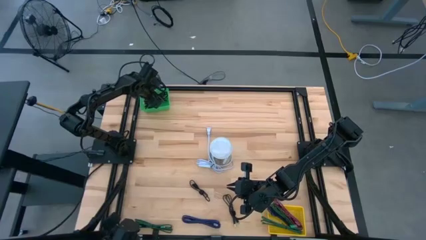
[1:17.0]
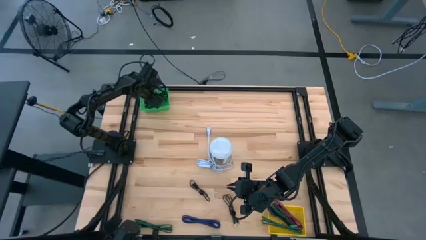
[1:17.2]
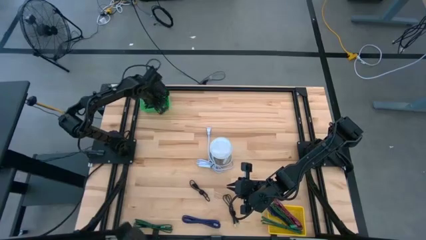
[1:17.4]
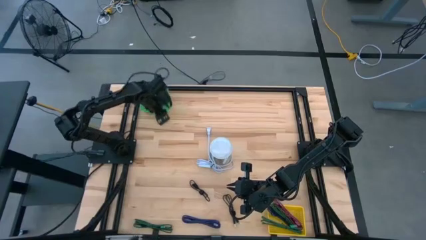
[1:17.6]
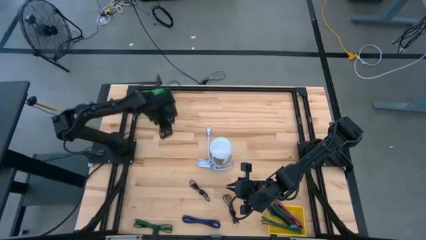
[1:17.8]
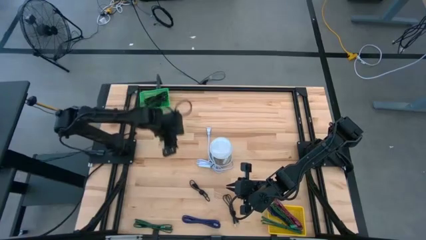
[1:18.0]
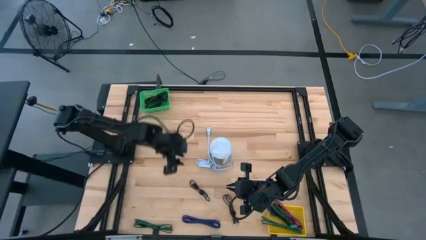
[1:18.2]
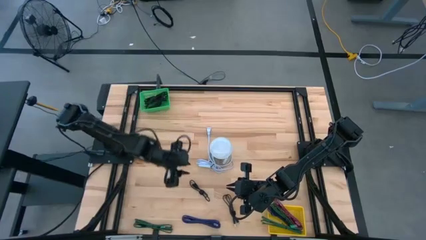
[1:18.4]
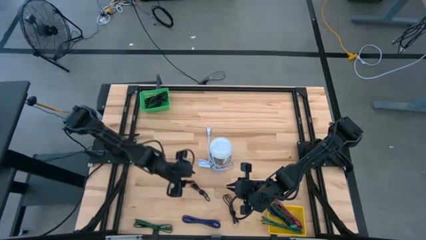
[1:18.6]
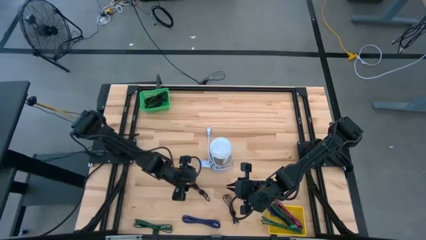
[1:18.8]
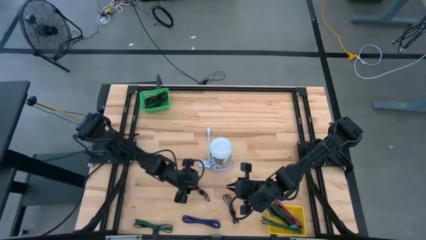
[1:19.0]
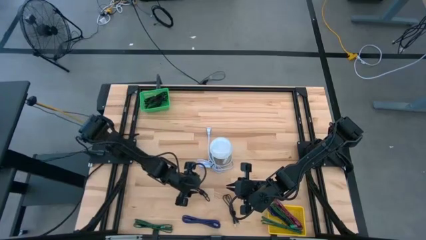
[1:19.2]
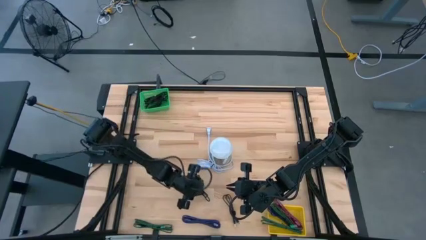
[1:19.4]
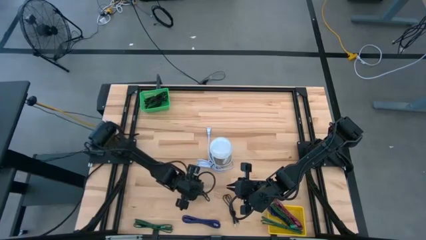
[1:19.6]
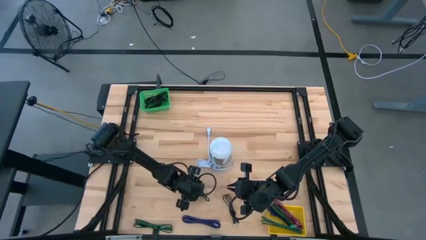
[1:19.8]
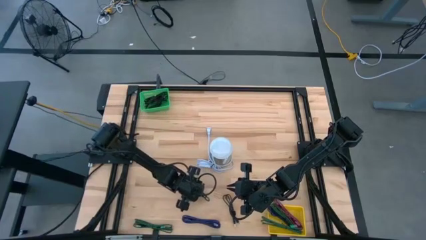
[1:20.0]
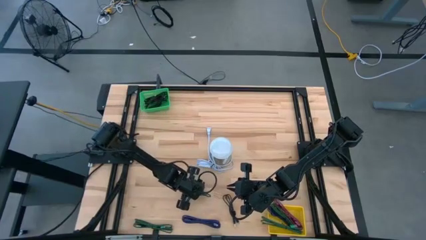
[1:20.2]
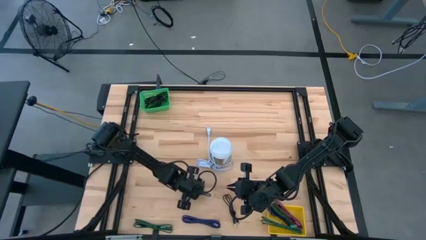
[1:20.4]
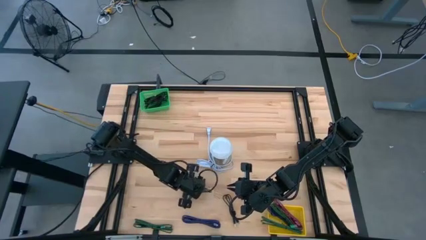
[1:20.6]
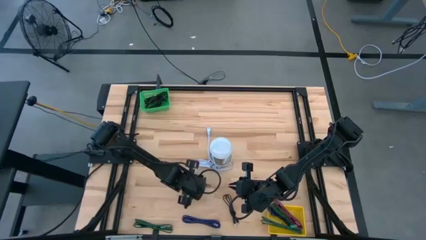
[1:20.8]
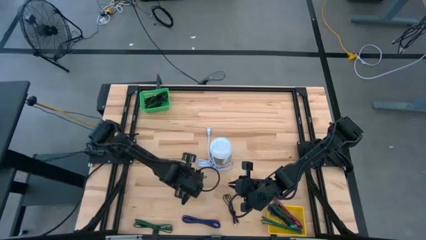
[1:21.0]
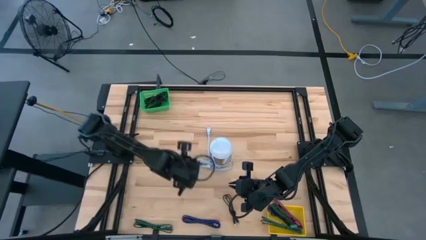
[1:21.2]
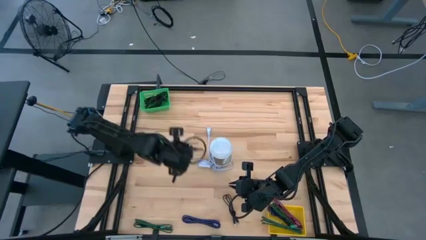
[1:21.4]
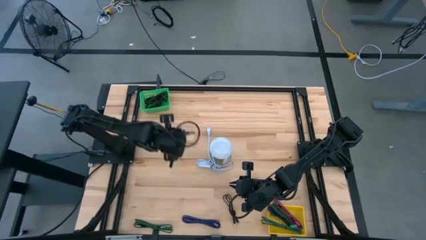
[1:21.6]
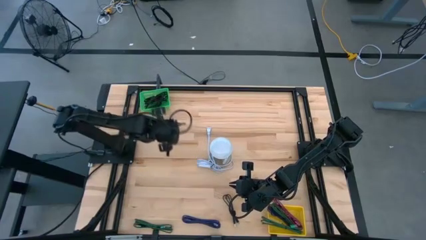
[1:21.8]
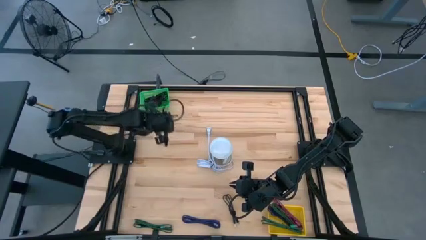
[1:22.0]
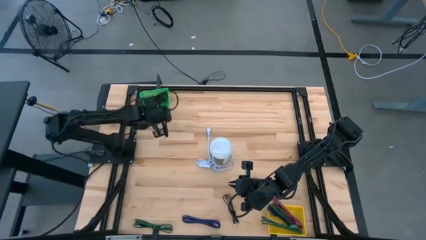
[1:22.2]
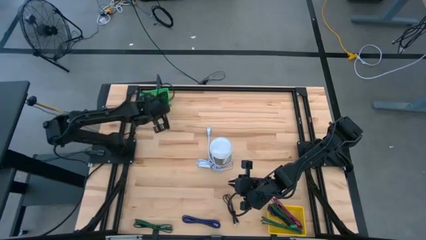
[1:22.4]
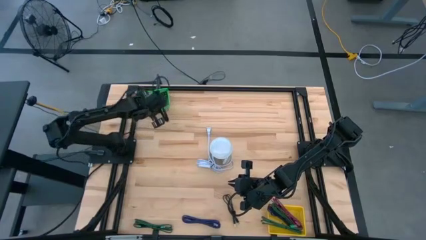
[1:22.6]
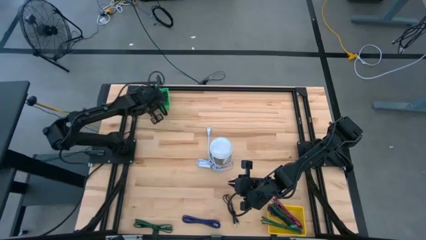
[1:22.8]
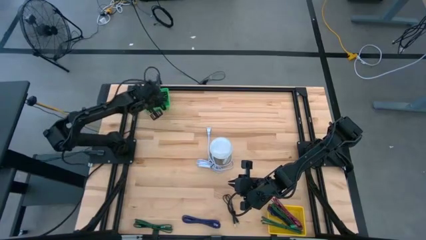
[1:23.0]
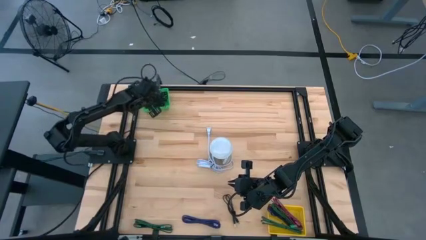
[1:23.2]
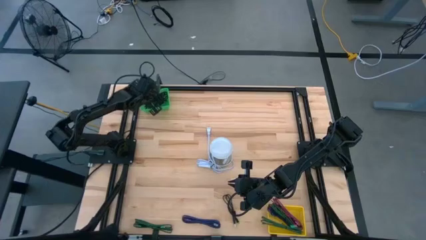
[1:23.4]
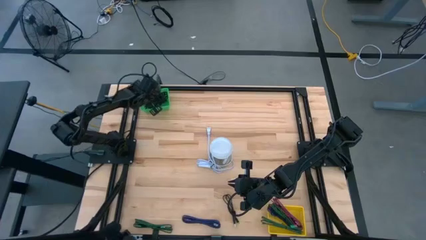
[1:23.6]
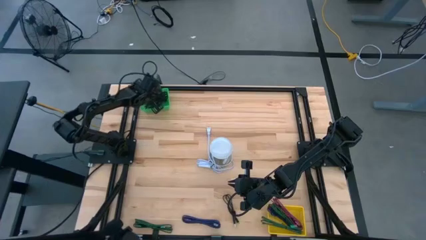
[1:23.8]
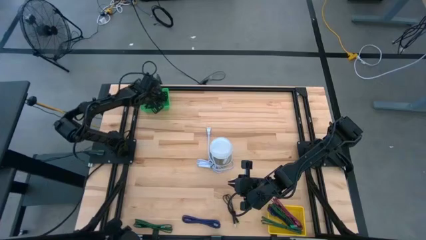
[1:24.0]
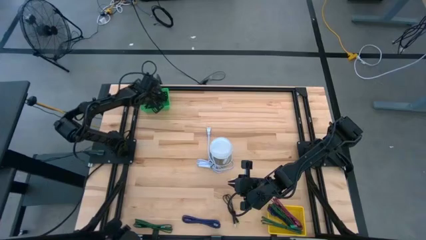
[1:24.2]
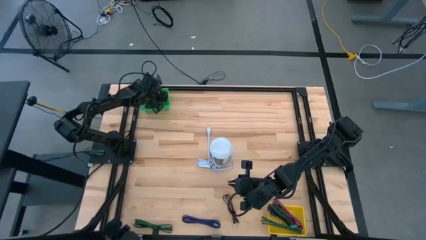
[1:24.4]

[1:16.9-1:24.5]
Task: Pick & Place USB Port
Put the plain black charger cable into the green basket

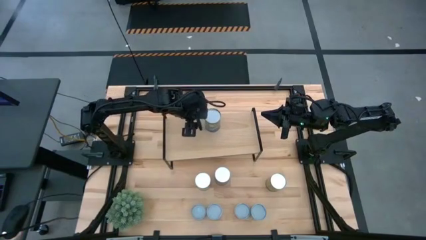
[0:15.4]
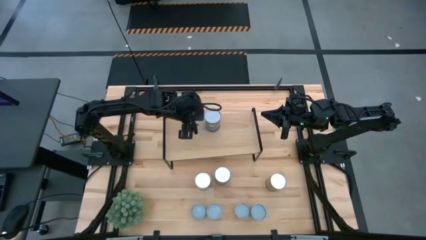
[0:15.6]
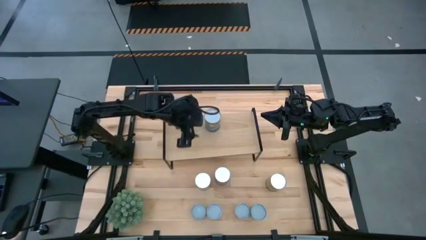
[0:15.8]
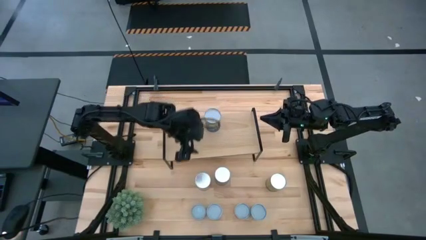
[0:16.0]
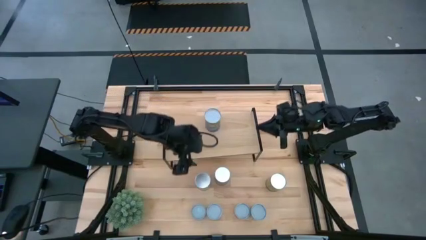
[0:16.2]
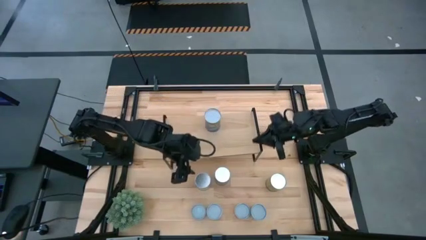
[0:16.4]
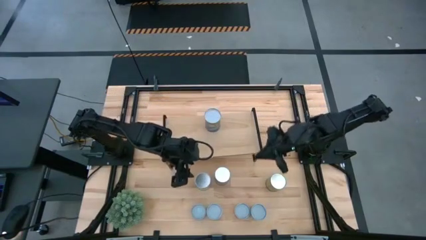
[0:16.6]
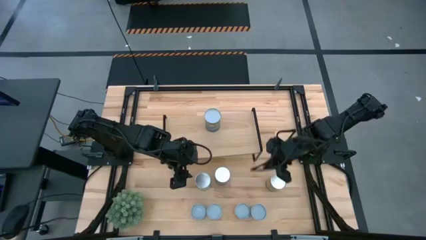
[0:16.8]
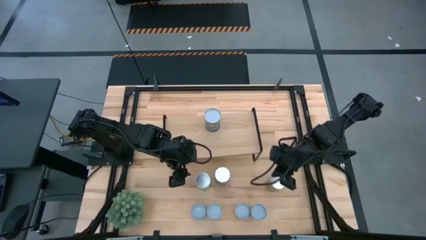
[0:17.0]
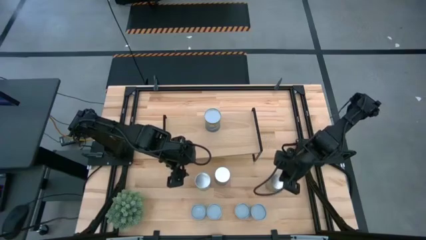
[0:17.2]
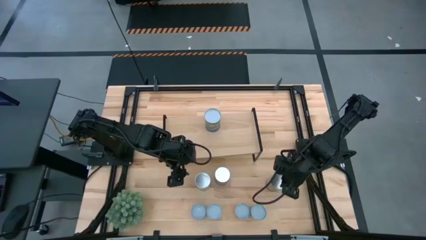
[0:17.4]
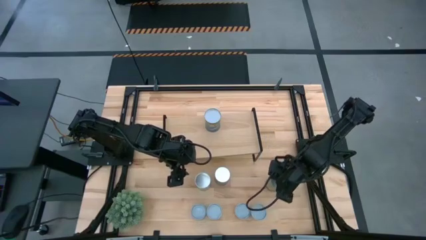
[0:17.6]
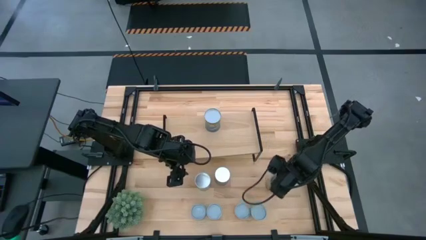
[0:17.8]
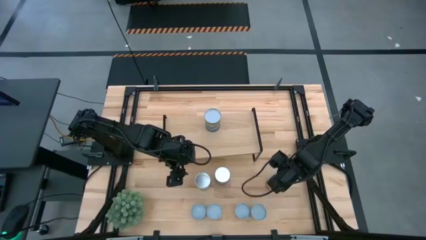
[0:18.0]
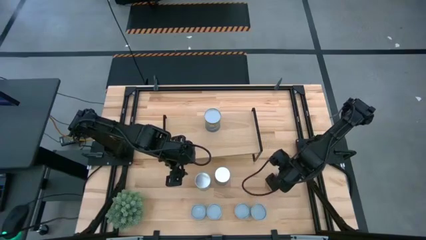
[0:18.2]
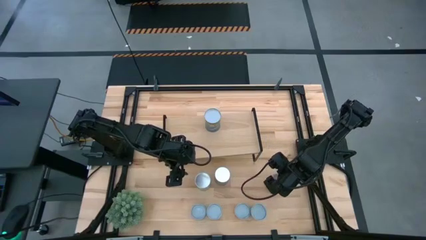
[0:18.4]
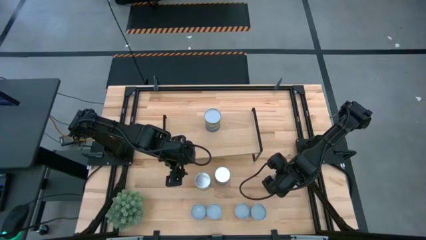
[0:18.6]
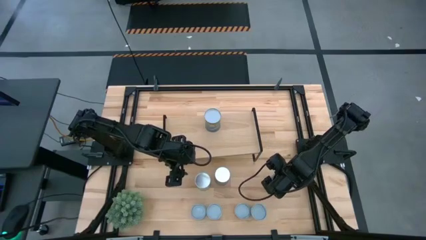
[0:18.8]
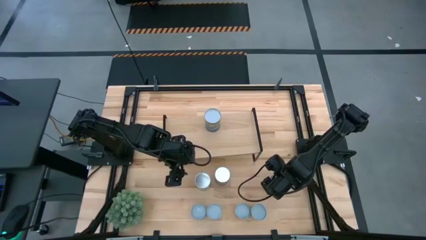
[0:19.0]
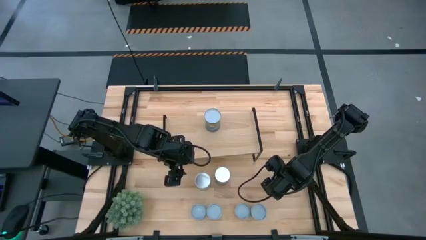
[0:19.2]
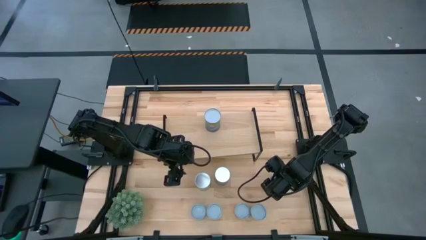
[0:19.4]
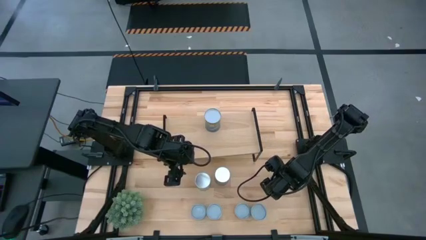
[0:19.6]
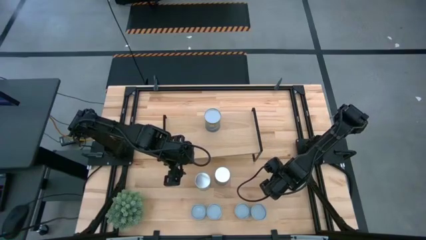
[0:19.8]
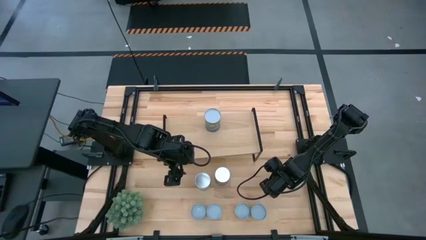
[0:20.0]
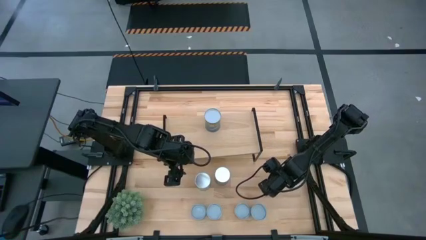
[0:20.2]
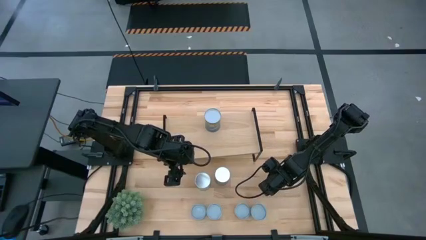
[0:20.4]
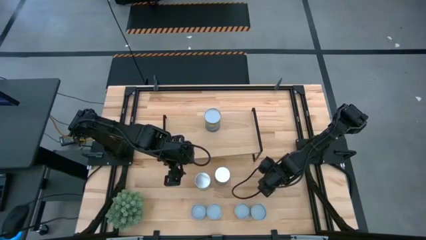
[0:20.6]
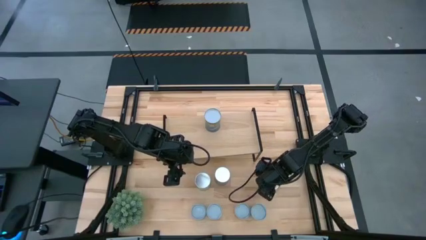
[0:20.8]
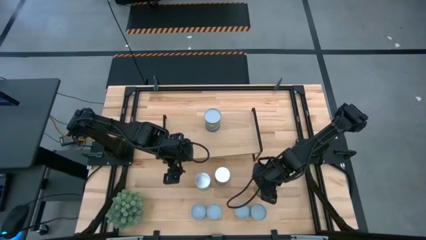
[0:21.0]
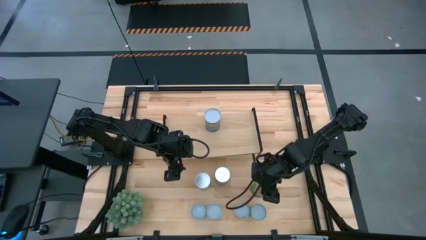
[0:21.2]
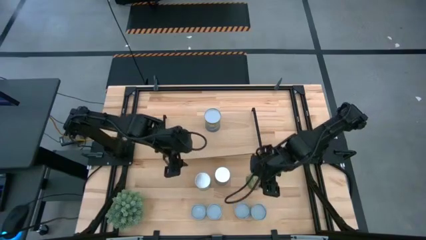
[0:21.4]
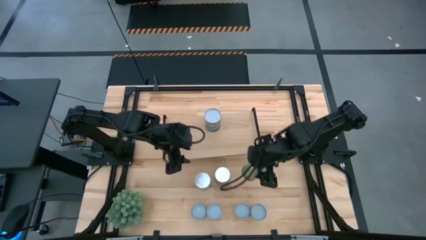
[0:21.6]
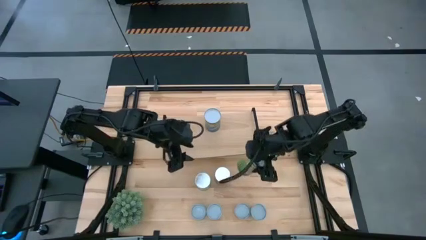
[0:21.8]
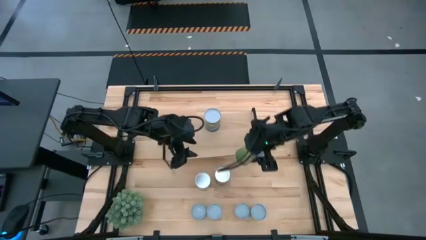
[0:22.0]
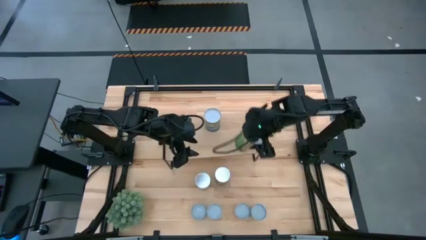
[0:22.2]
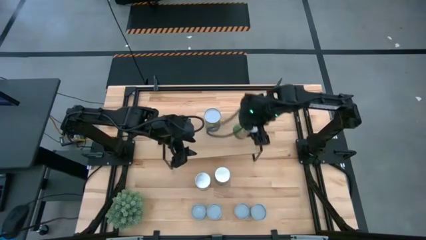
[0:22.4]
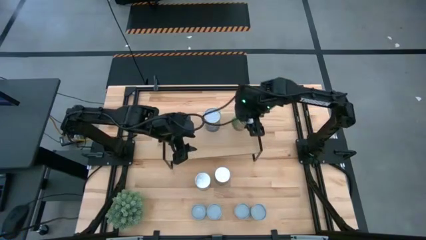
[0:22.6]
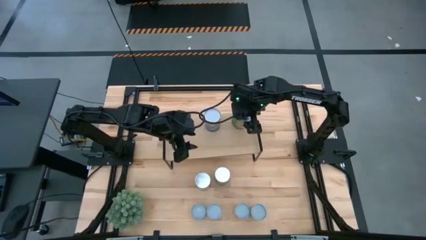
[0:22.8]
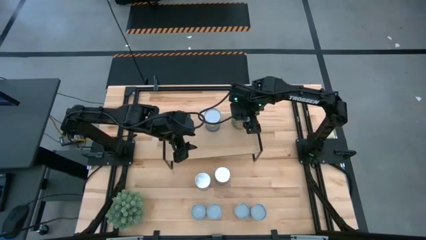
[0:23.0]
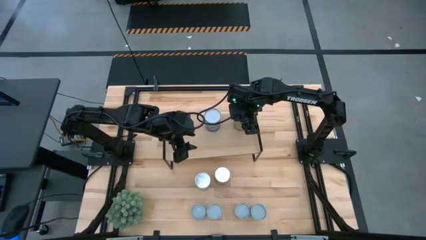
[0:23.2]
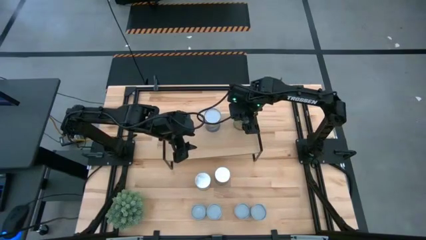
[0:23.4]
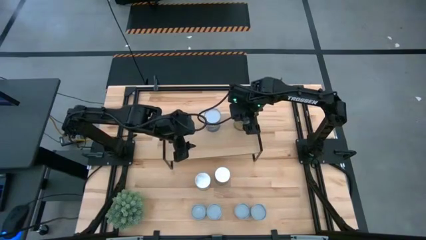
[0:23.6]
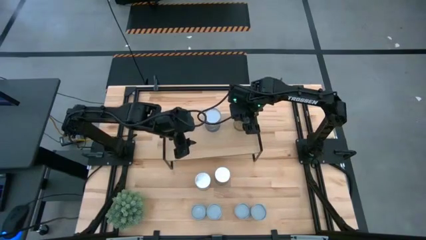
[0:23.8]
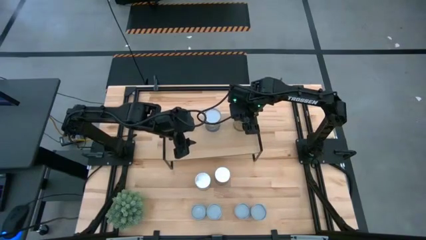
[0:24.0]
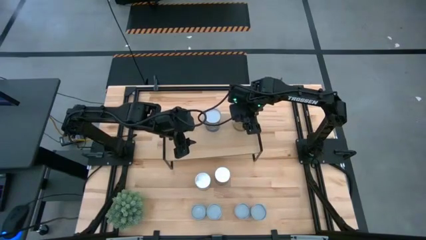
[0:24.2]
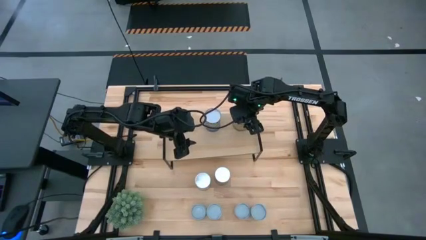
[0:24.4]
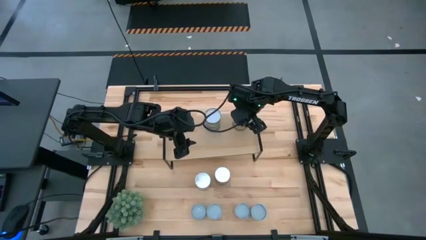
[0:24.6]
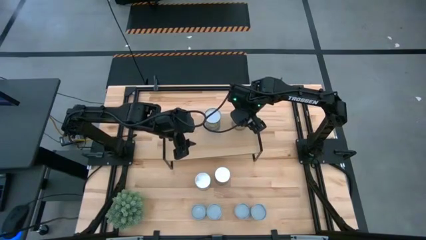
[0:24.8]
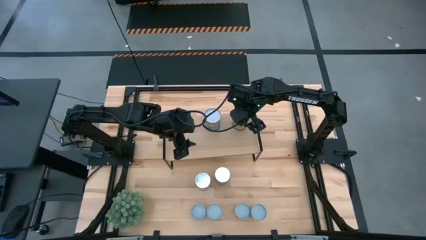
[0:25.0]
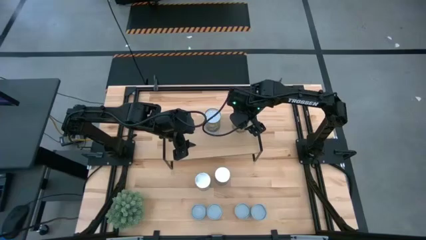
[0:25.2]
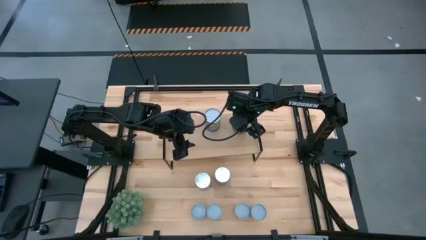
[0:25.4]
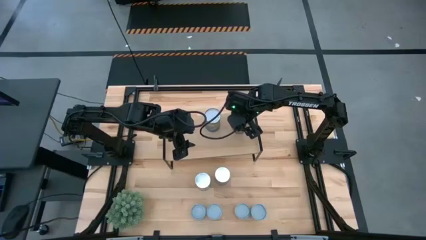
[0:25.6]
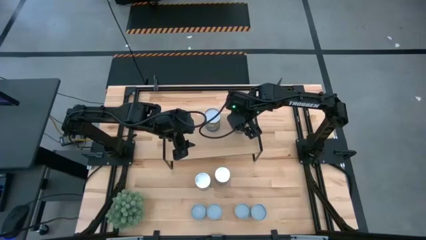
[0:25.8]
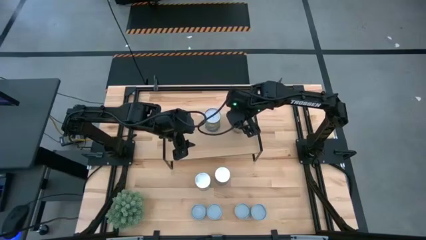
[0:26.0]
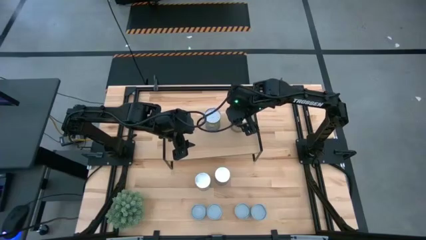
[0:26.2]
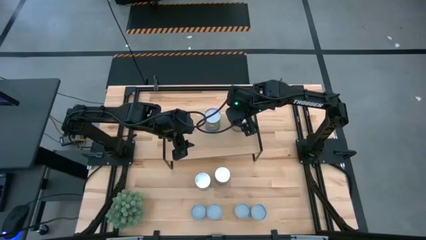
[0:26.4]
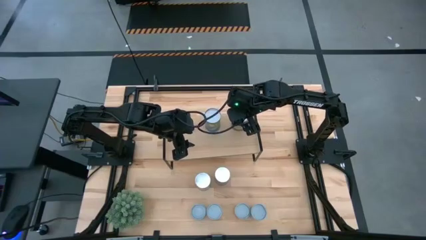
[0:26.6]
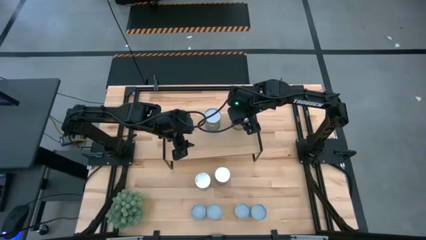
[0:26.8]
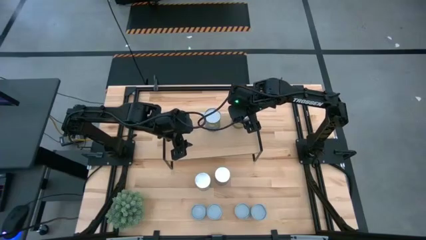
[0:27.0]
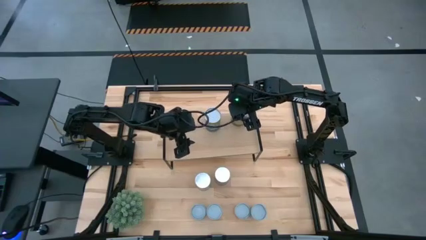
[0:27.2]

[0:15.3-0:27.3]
Task: Pick and place cans onto a shelf
Put the canned oranges on the shelf
